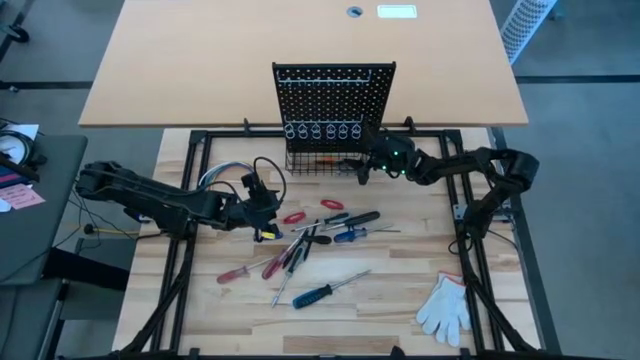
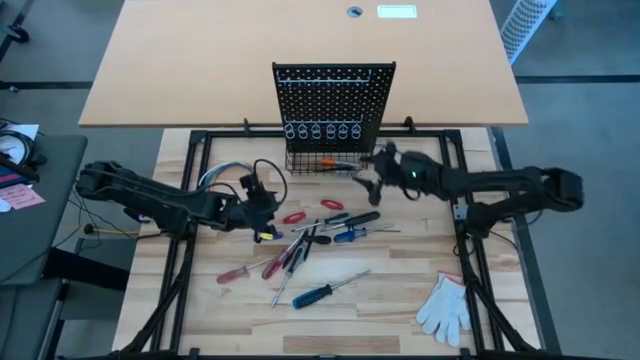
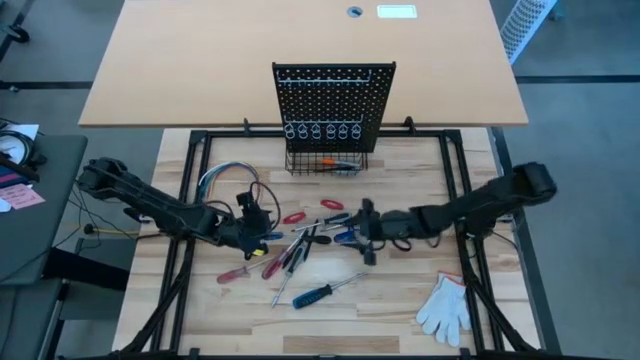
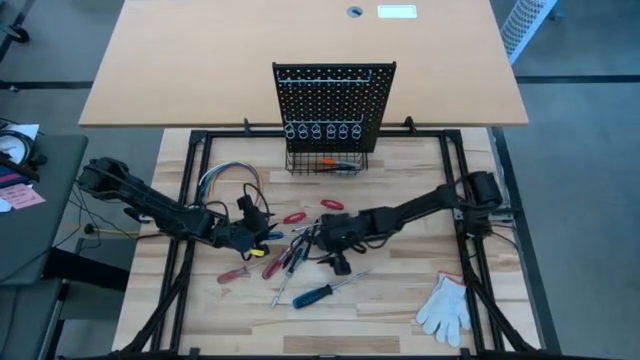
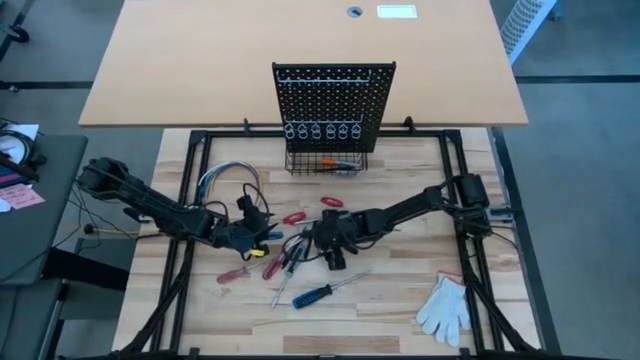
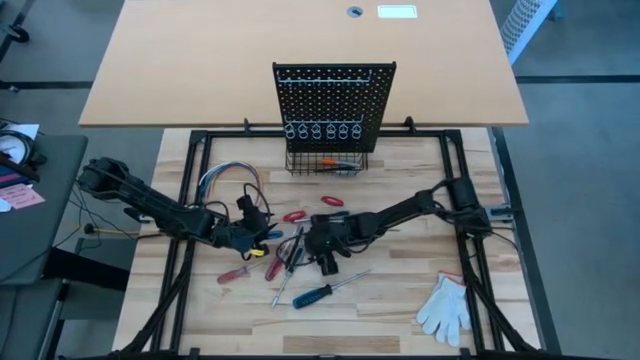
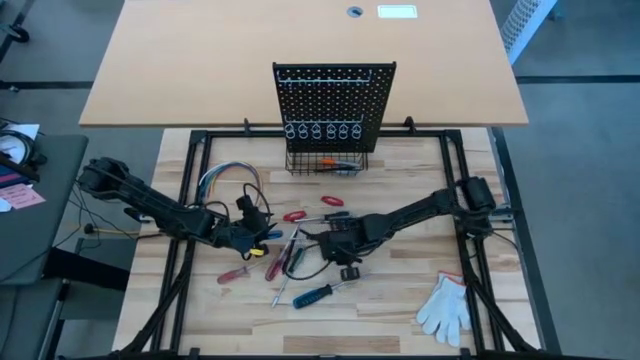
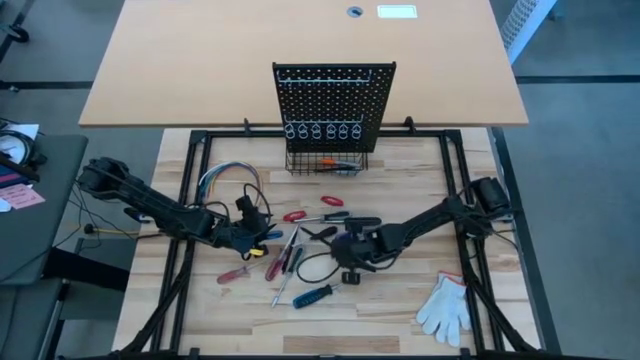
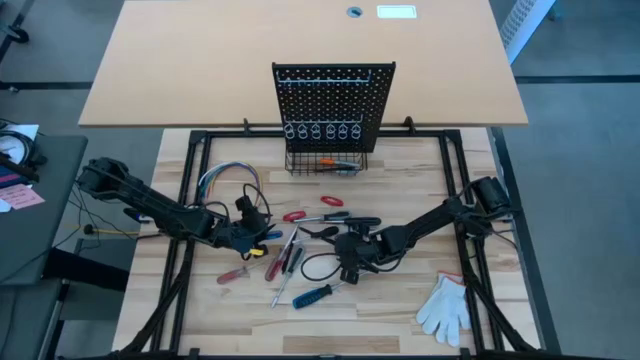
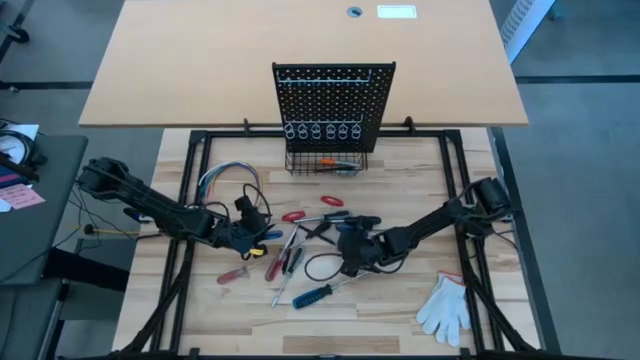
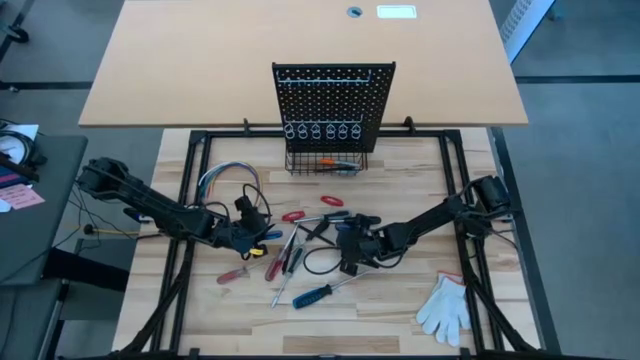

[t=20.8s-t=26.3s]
Task: Hang tools onto peg board
Move the black pen

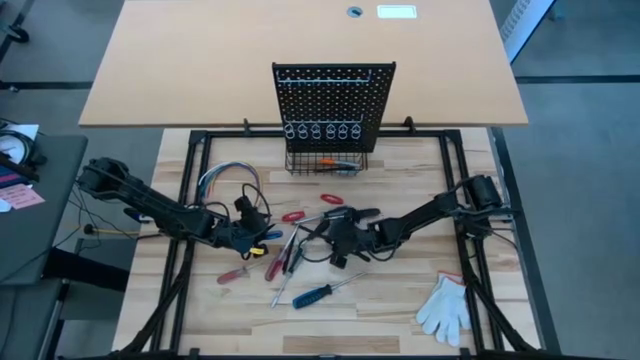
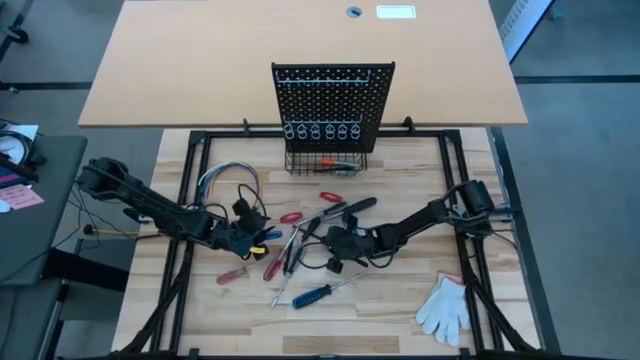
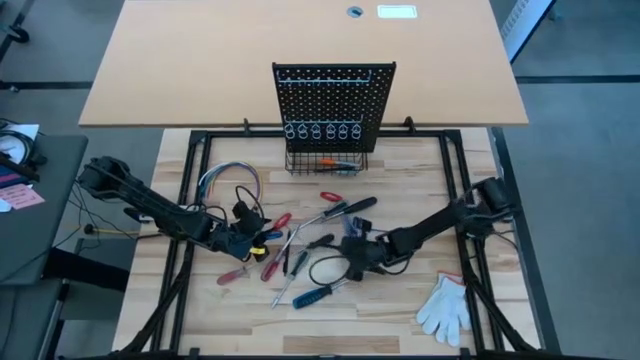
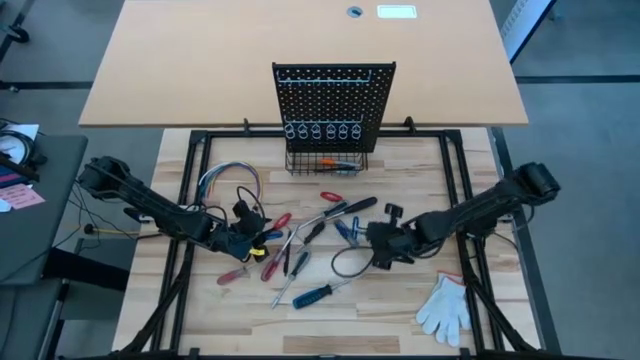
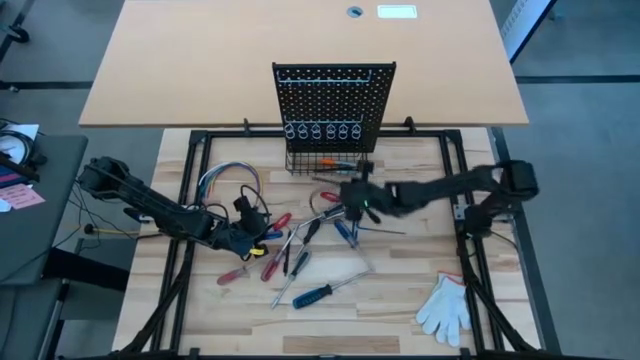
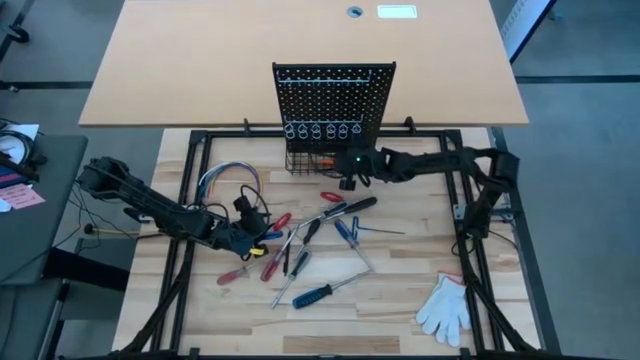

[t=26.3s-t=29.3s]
Put the right black pen into the basket on the pegboard

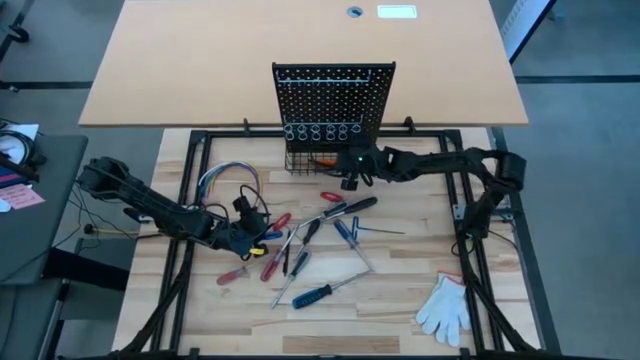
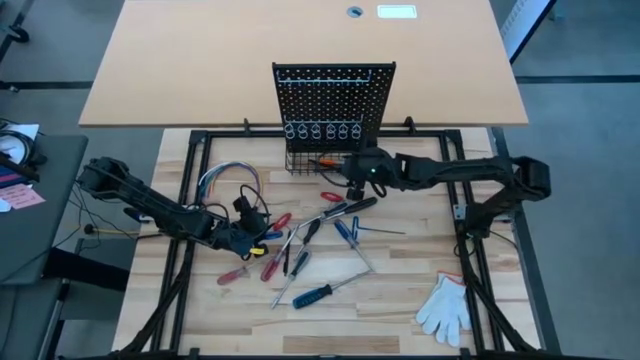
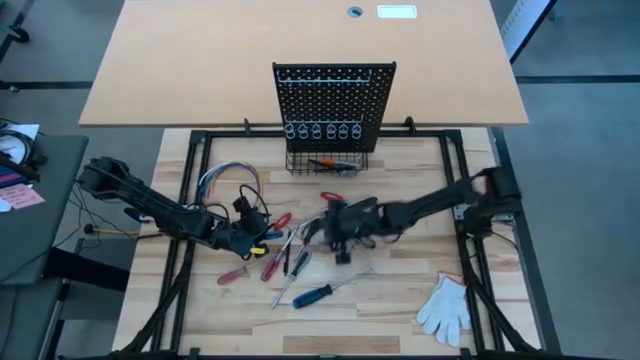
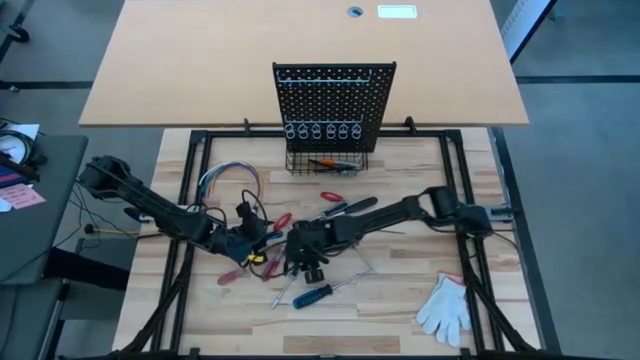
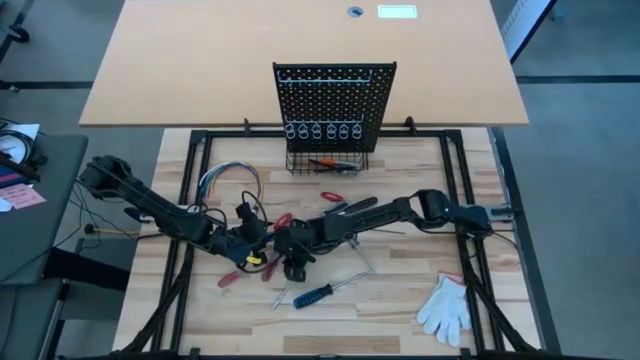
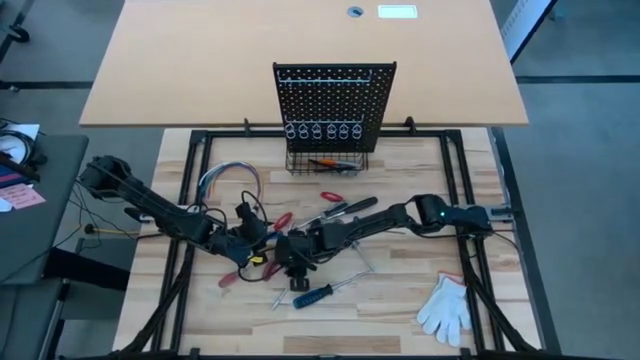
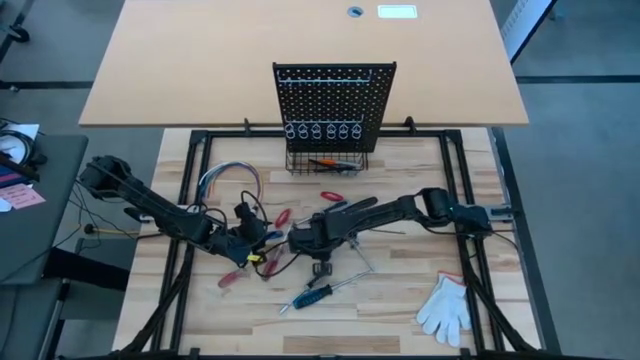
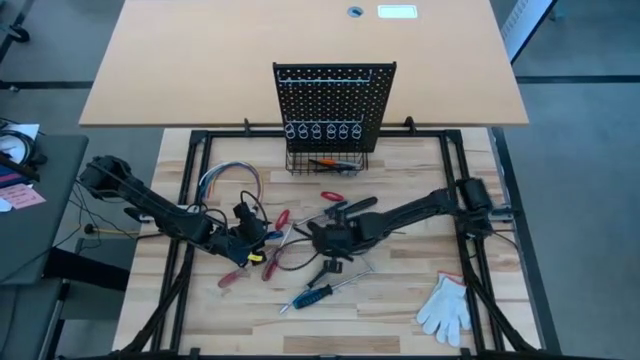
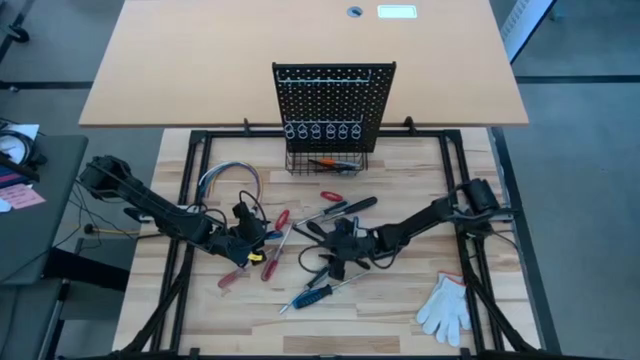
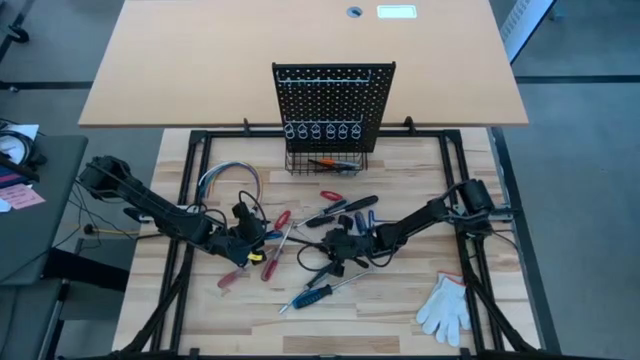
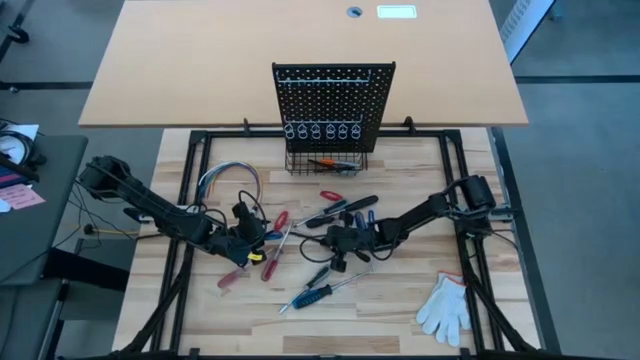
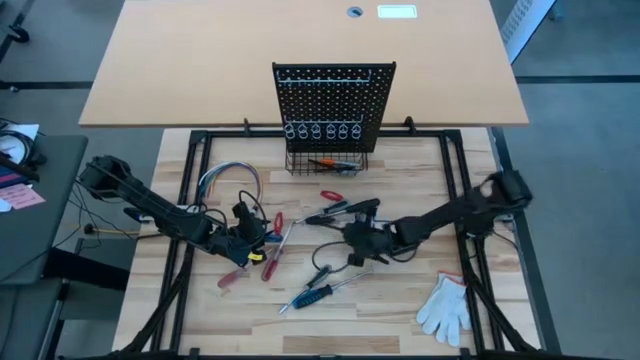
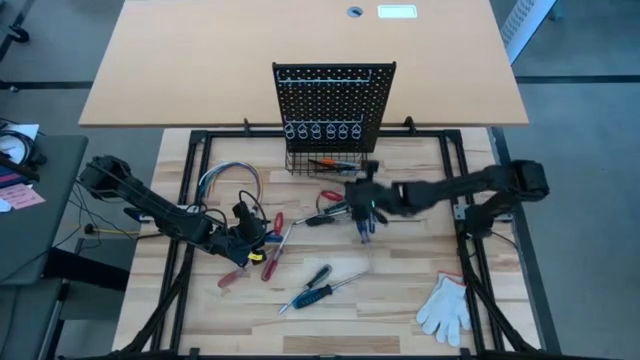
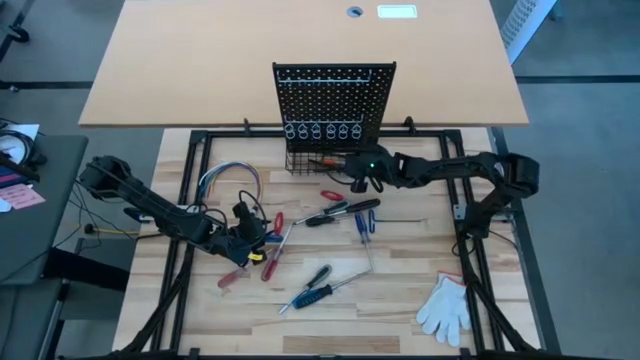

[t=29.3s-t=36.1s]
Put the black pen into the basket on the pegboard

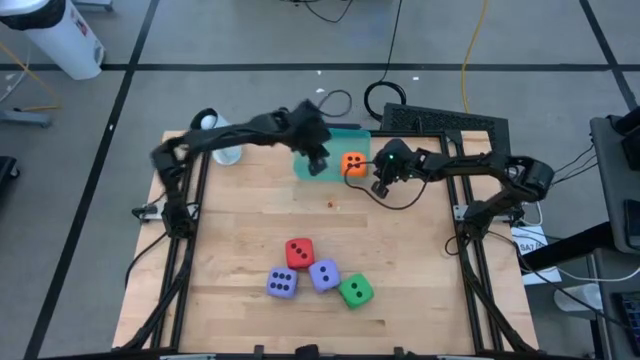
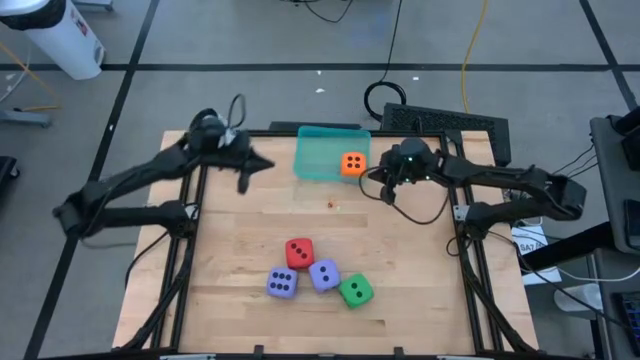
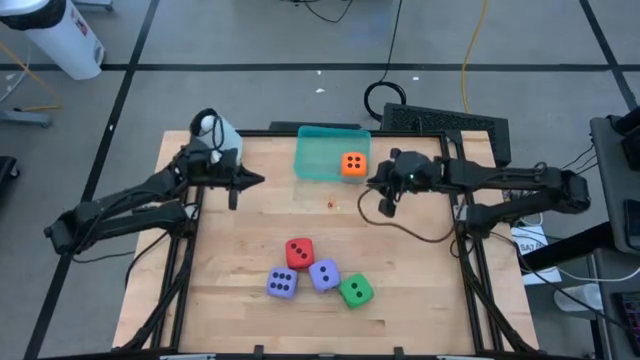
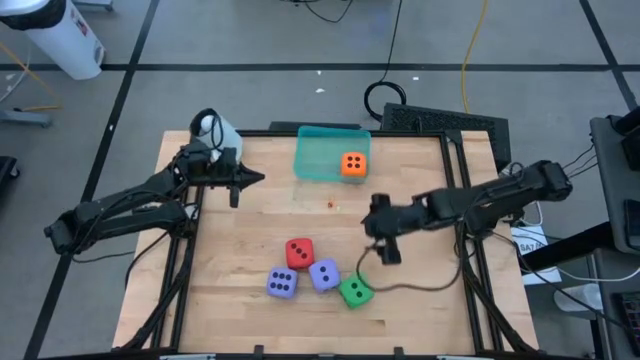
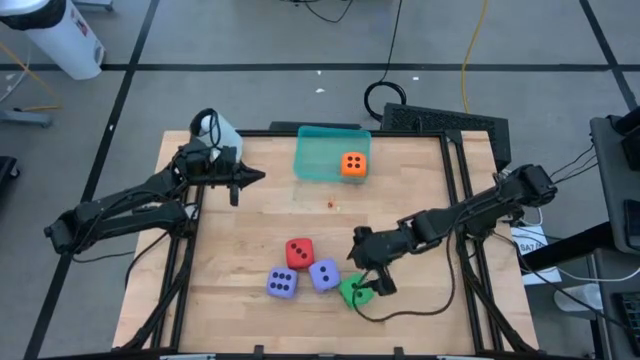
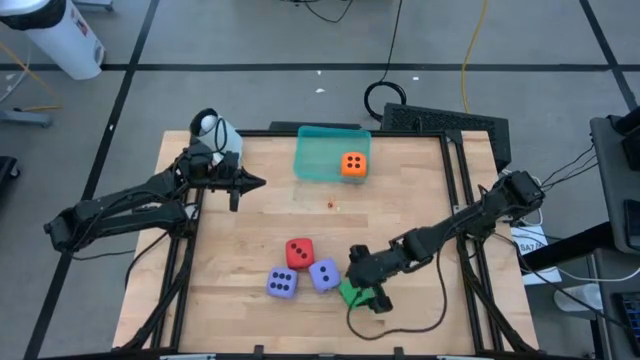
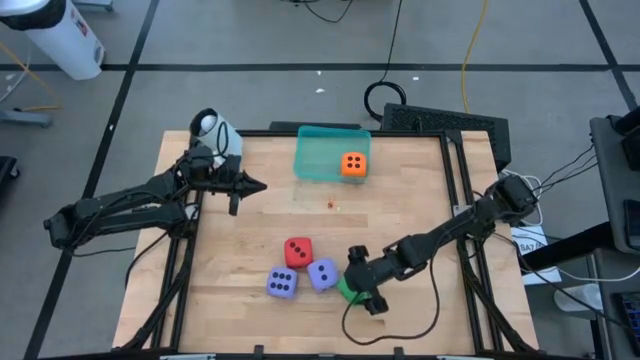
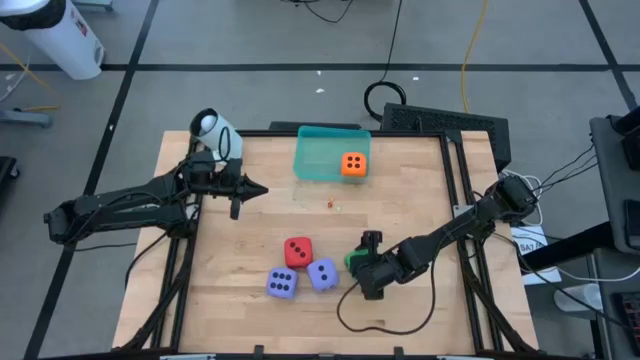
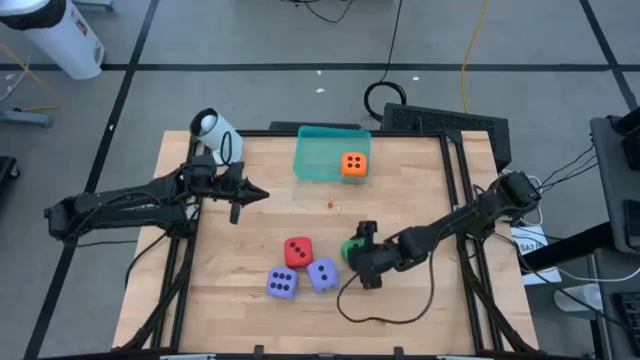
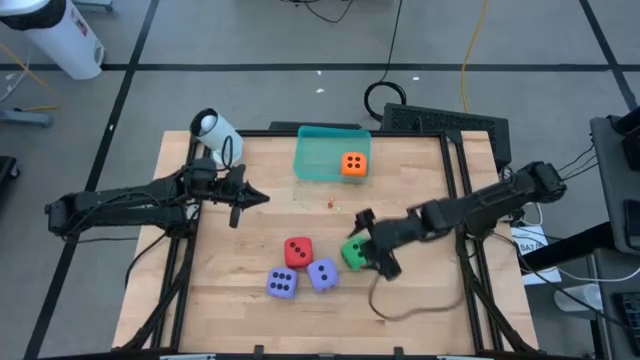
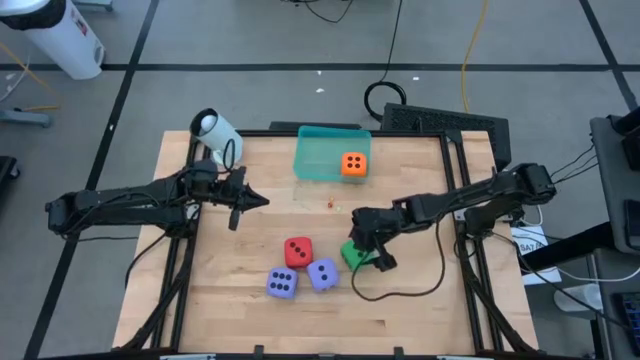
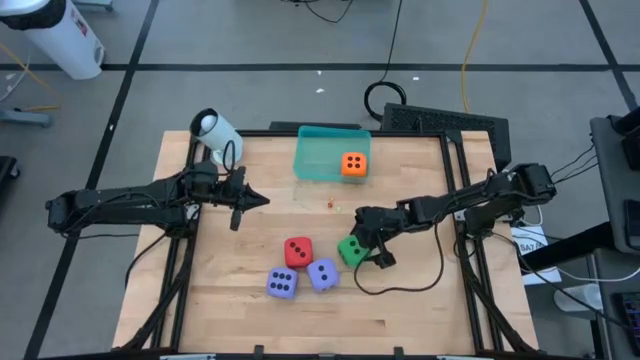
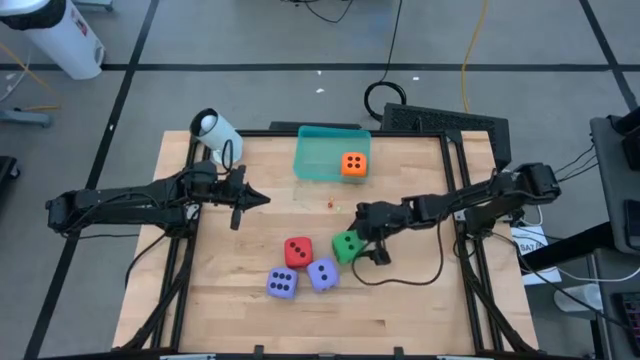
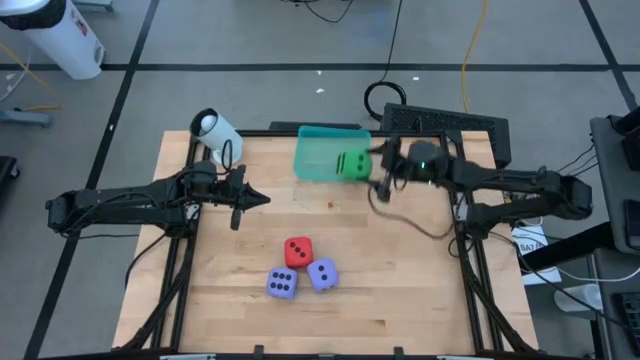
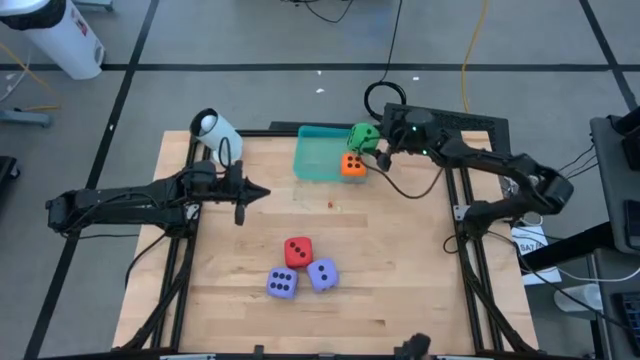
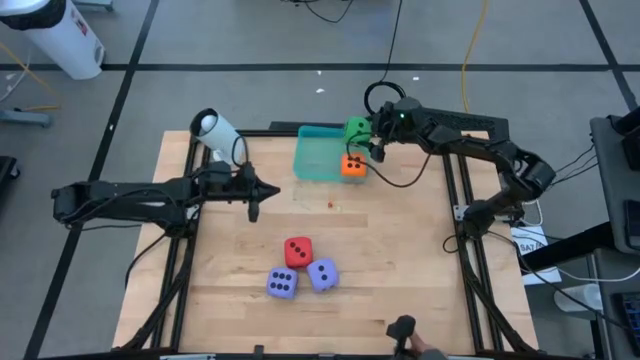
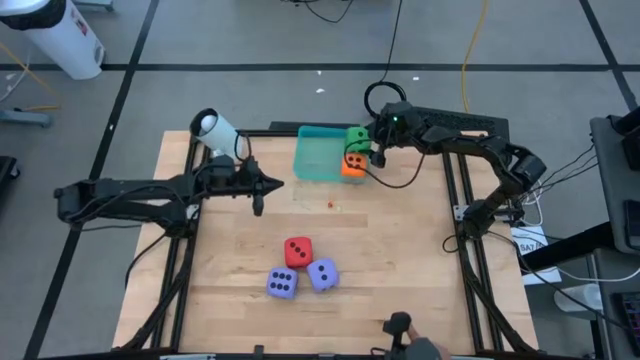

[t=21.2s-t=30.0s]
Task: Pick & Place Dice
Put the large green die into the blue bin
